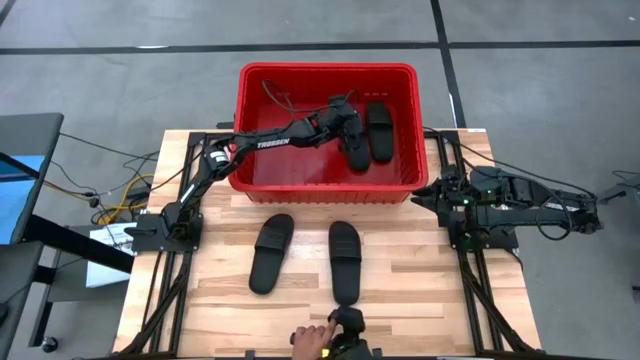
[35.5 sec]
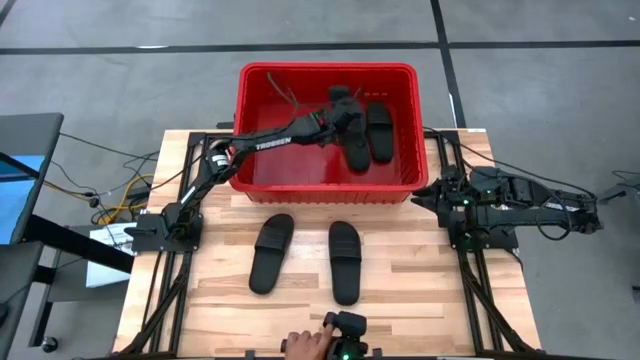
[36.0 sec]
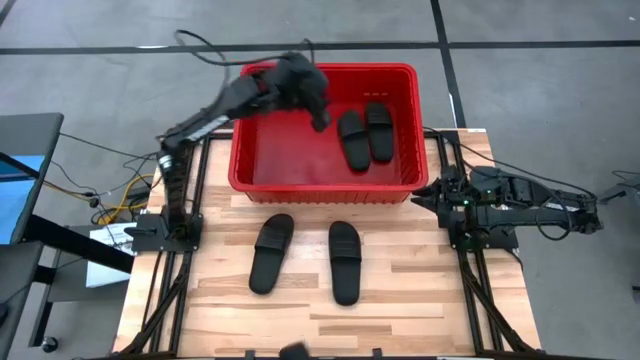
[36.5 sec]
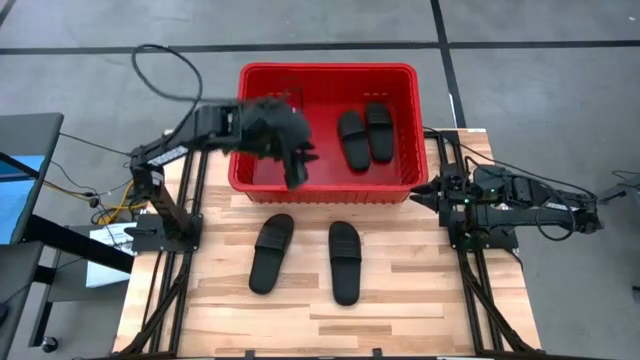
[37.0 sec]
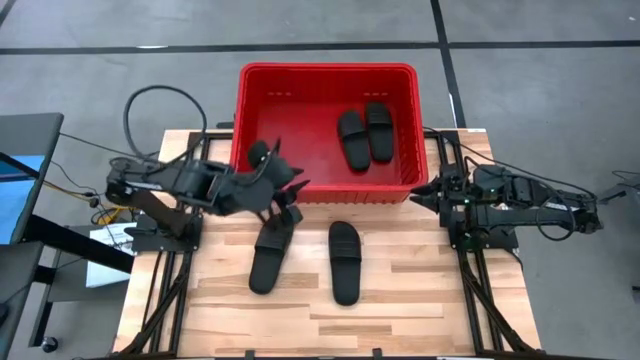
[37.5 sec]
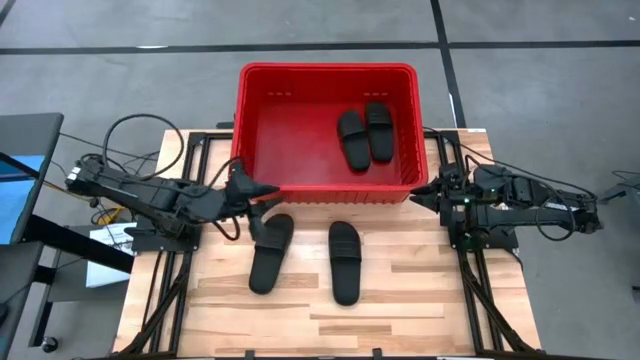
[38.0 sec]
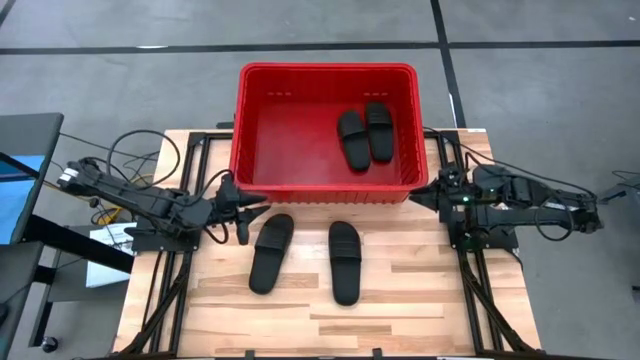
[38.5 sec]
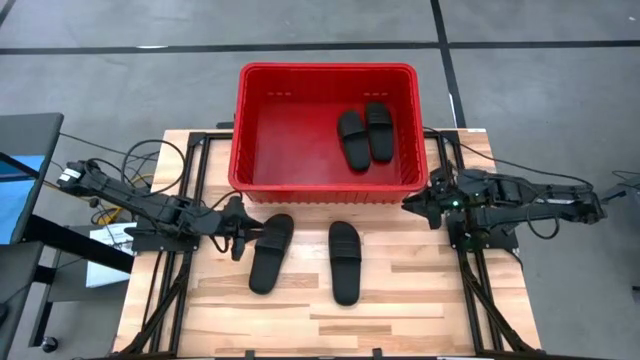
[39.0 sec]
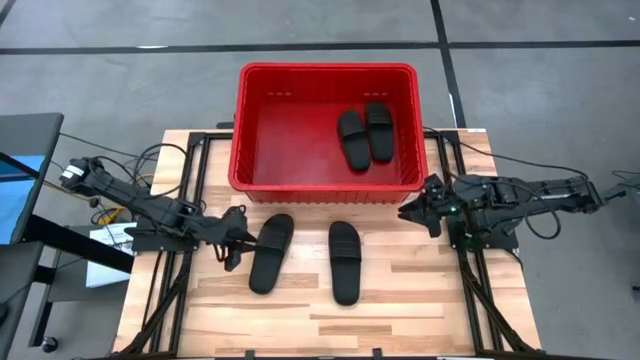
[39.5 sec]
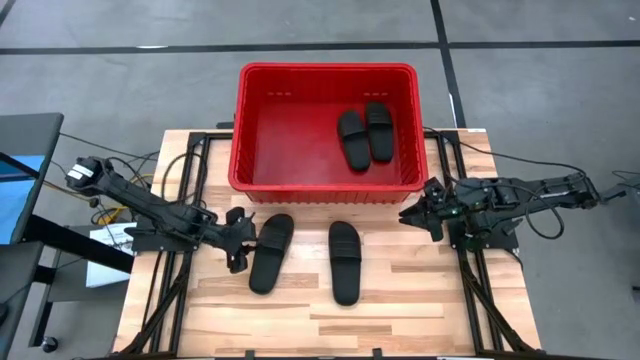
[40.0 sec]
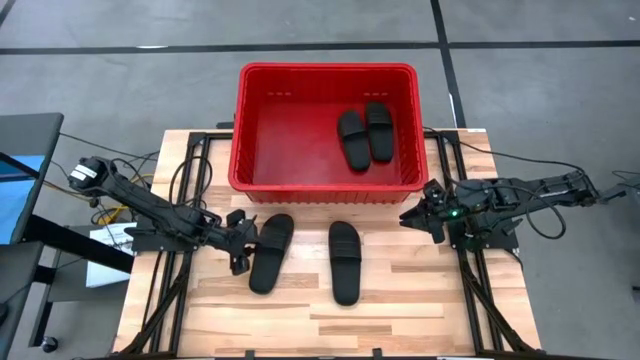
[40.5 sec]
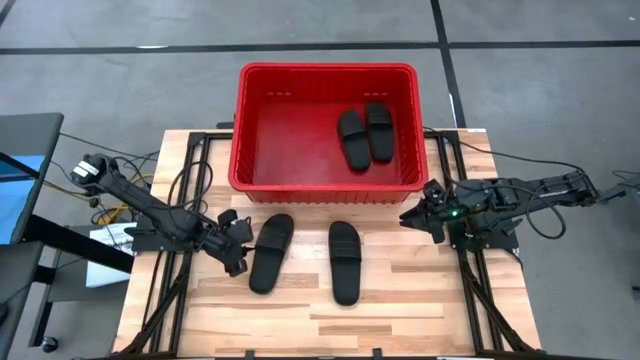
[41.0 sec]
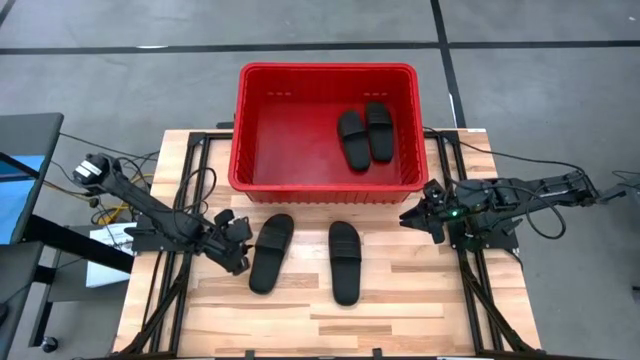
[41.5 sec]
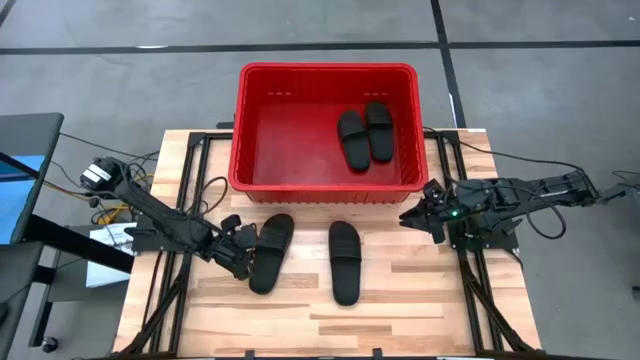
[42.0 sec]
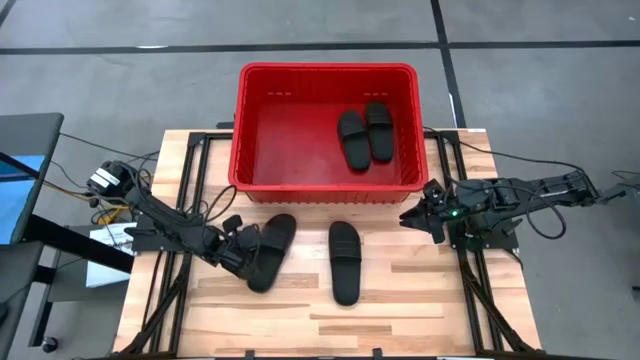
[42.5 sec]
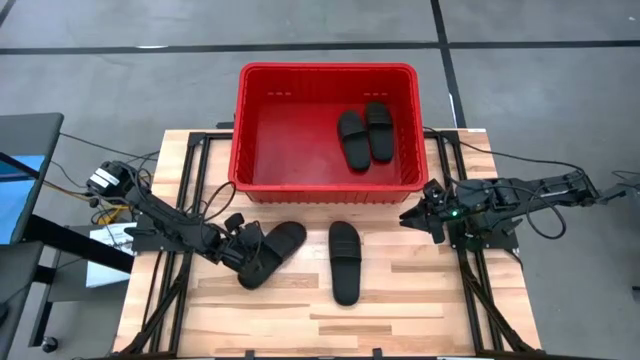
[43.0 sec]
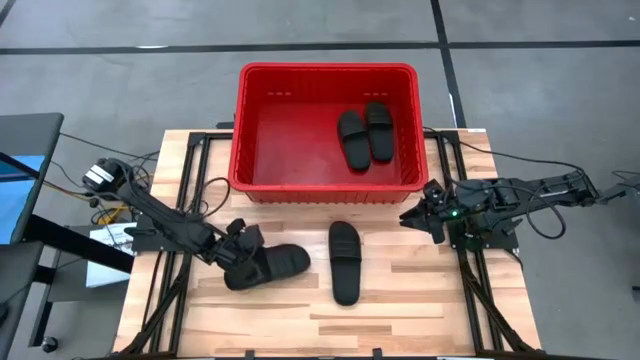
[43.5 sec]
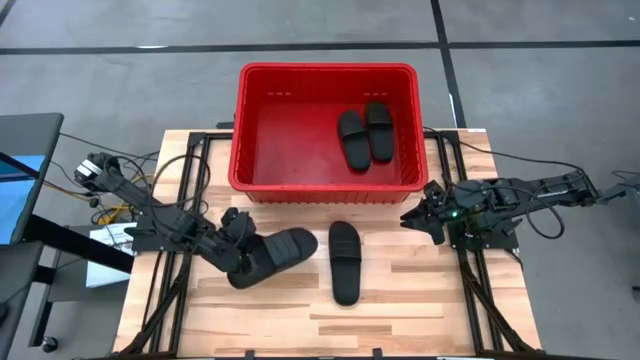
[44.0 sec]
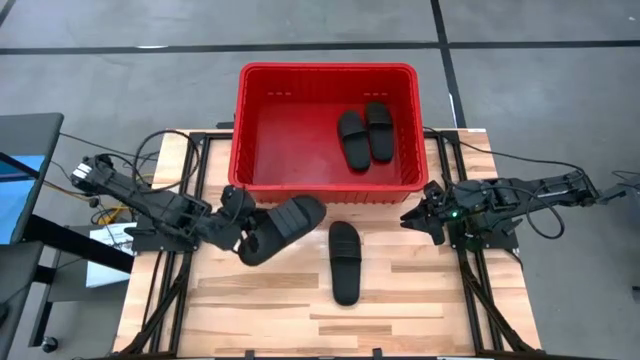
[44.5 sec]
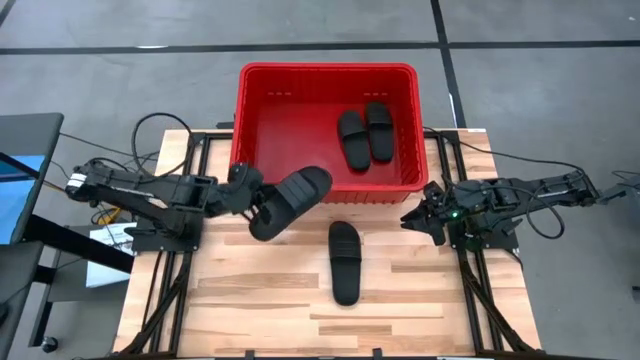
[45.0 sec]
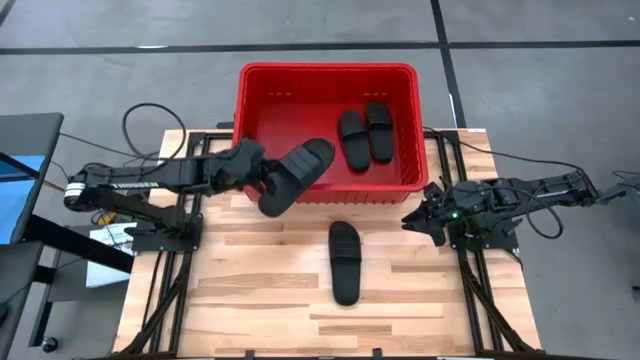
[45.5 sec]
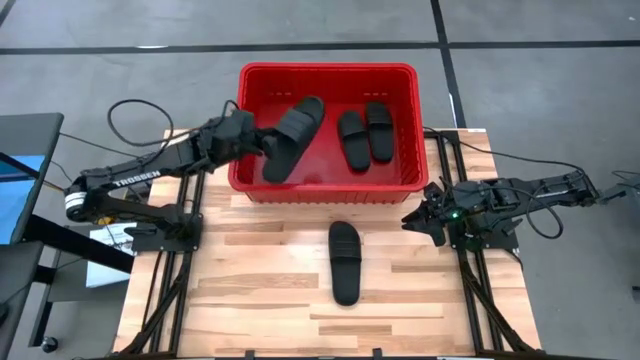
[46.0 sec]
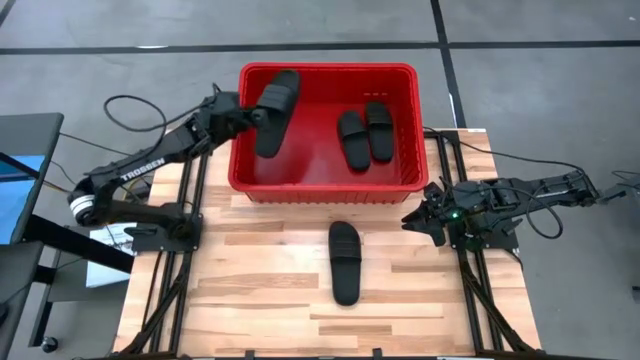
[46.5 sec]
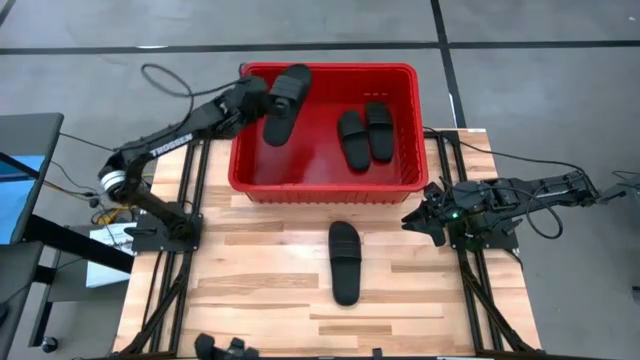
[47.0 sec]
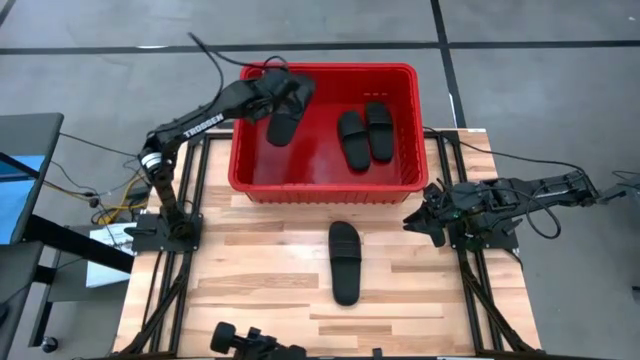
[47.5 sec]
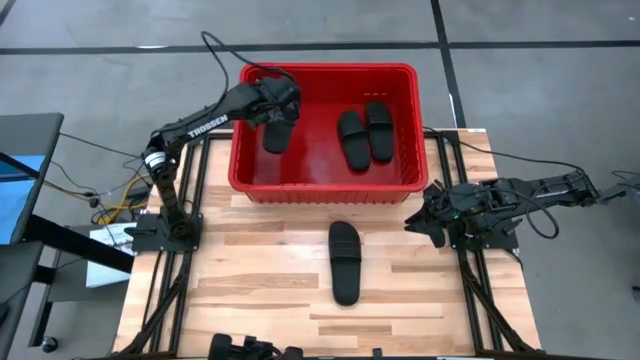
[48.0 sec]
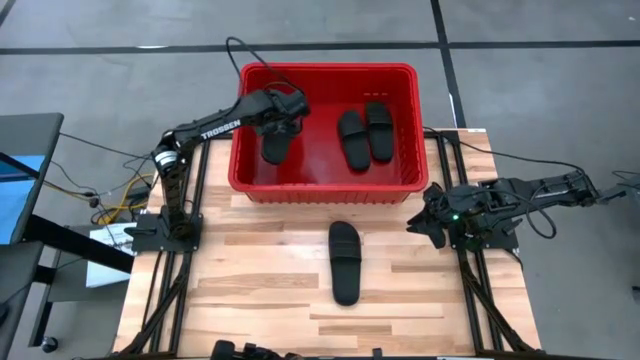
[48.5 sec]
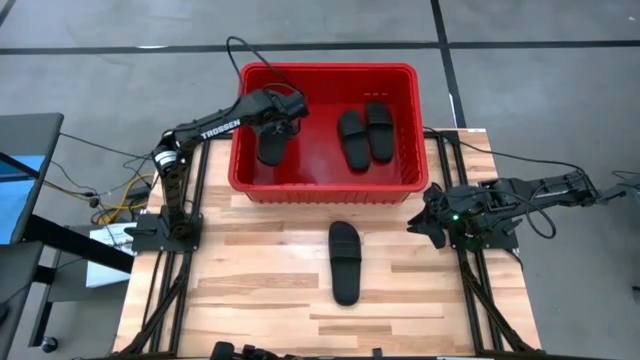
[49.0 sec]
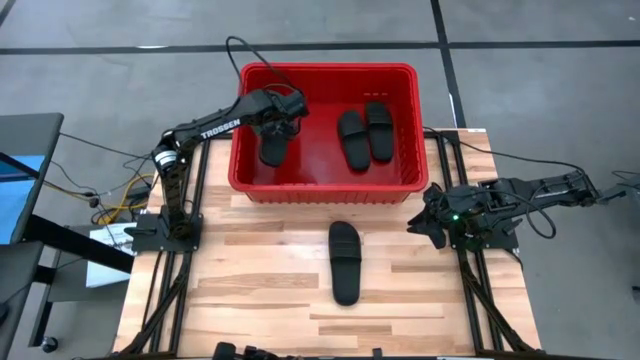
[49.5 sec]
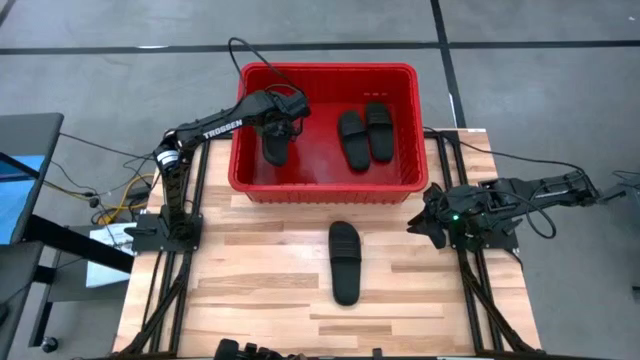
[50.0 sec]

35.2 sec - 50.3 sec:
Task: Pick and place slides into bin
Put the black slide into the red container

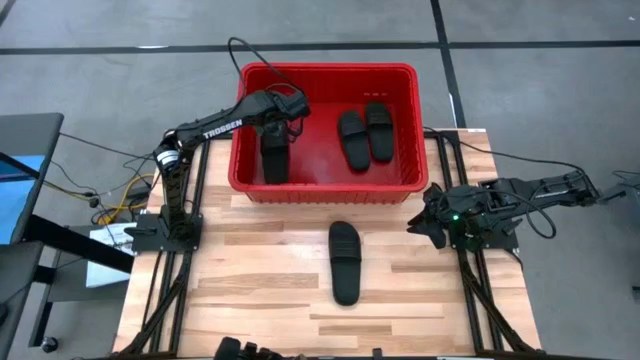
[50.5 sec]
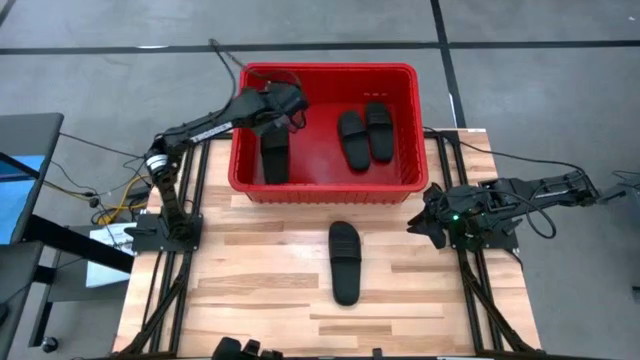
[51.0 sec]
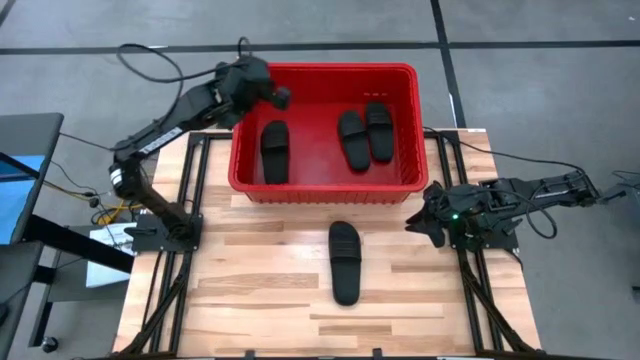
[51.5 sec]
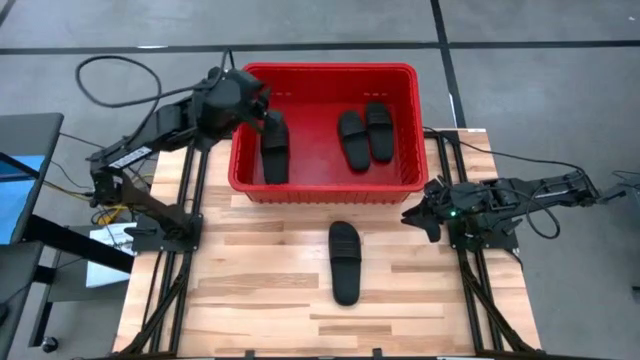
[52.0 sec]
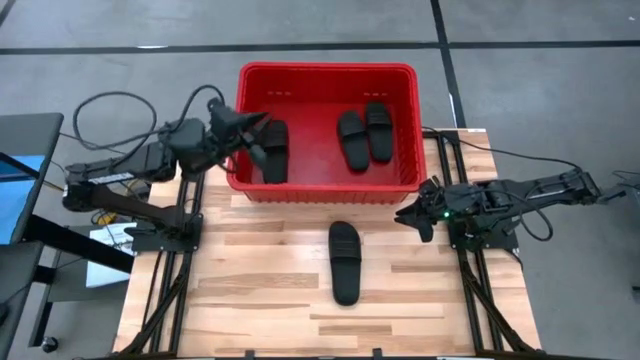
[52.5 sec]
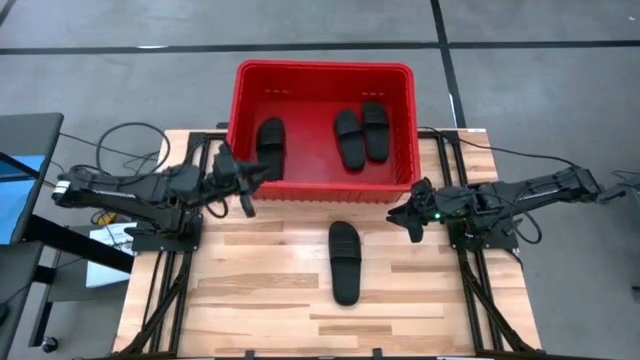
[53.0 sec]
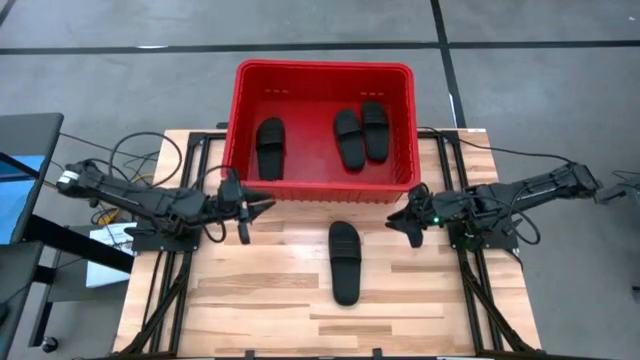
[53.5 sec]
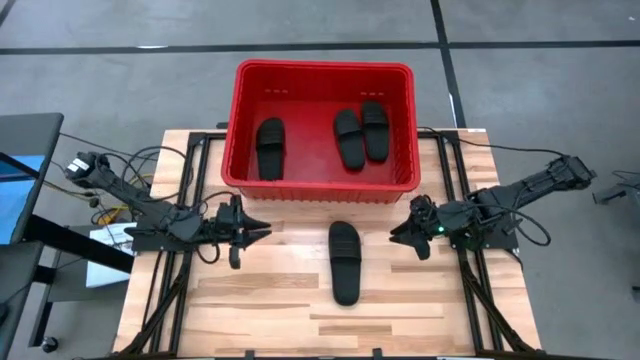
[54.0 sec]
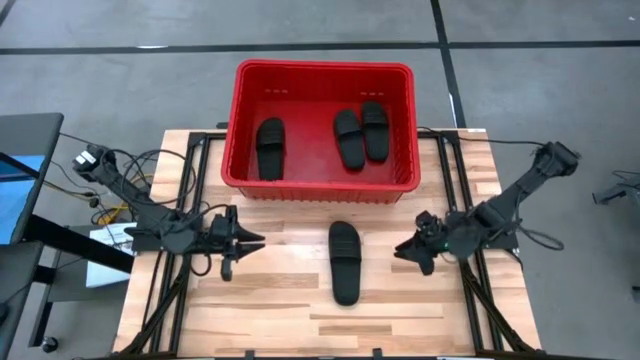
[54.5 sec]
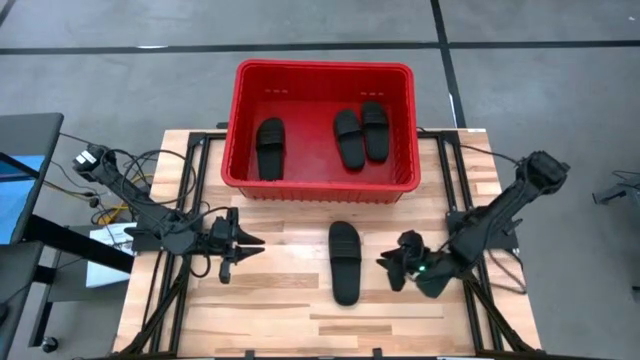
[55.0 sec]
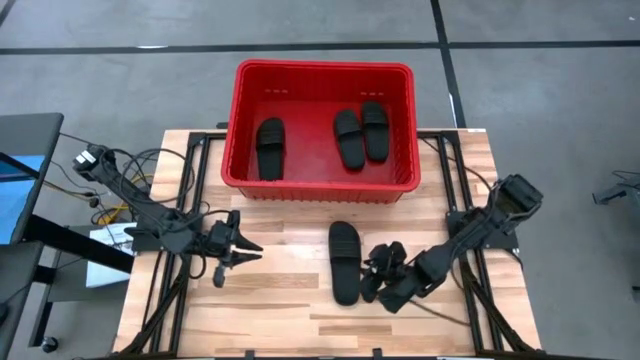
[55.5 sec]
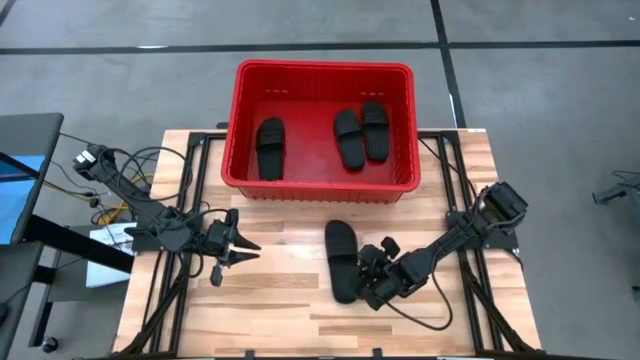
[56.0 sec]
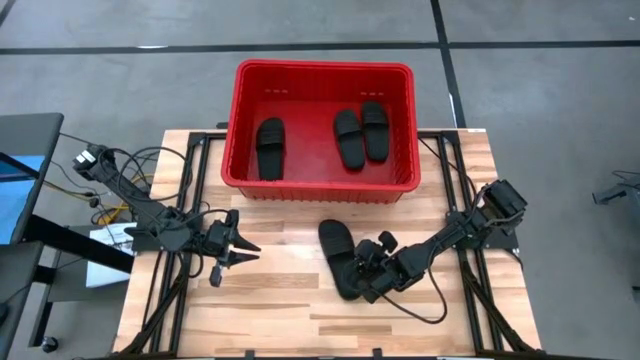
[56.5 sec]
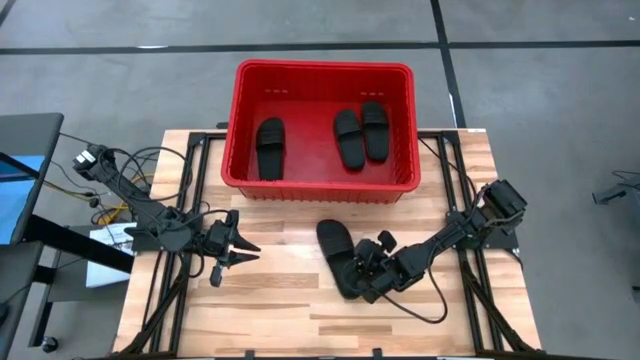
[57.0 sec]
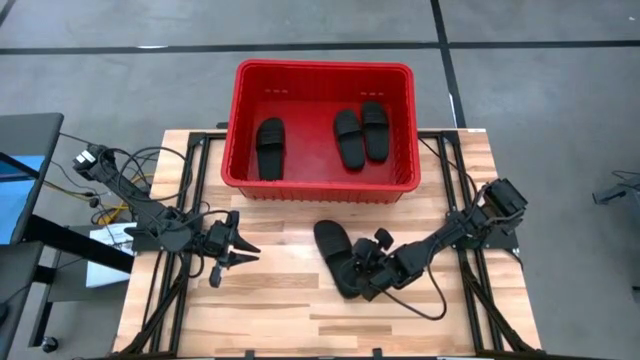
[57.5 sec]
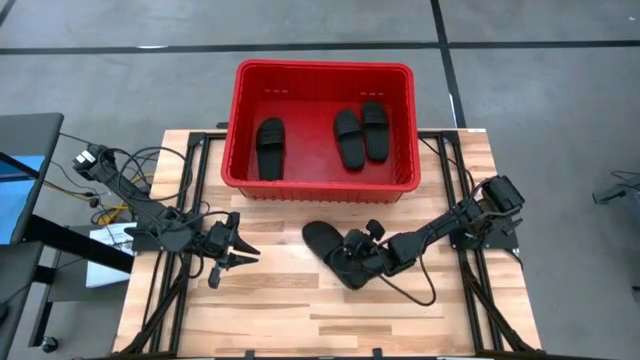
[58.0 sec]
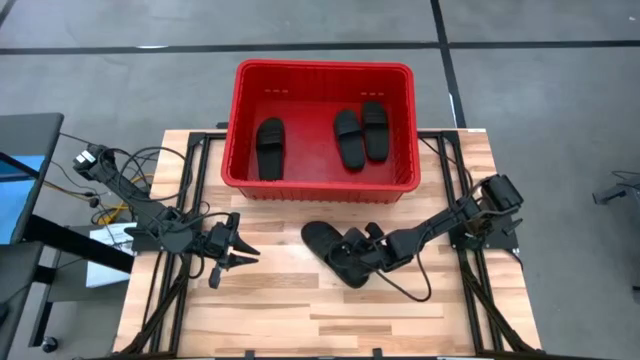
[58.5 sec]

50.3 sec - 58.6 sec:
Put the black slide into the red container
